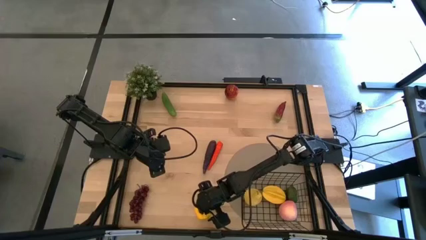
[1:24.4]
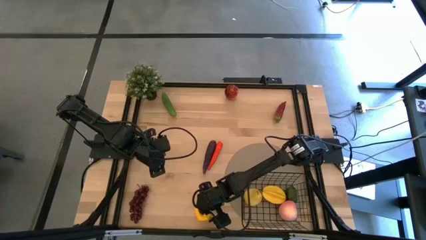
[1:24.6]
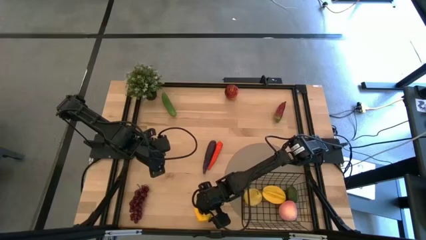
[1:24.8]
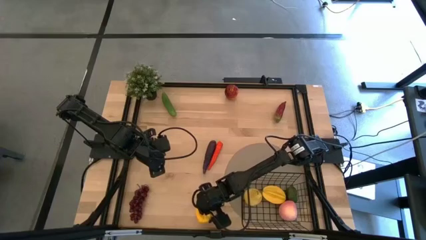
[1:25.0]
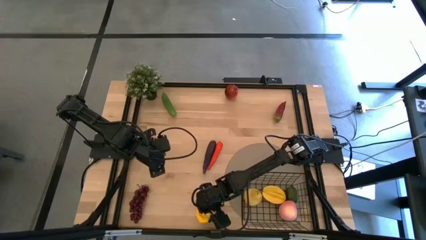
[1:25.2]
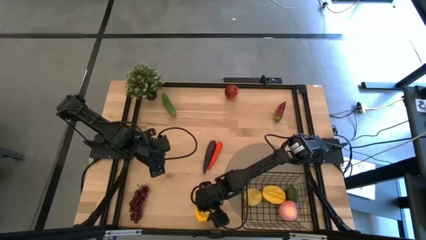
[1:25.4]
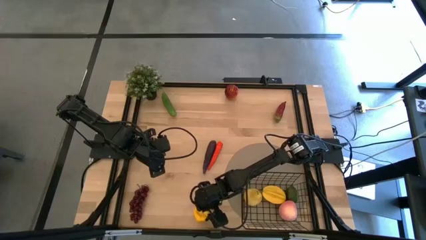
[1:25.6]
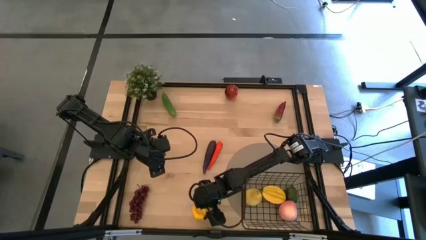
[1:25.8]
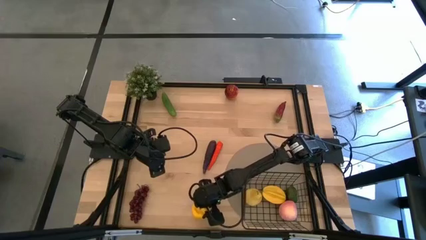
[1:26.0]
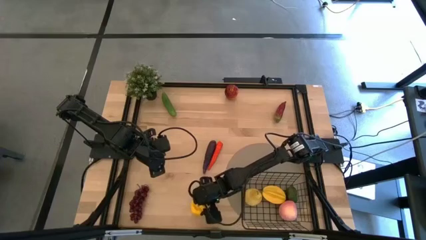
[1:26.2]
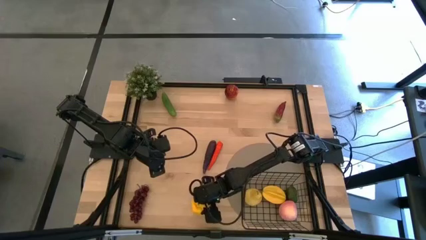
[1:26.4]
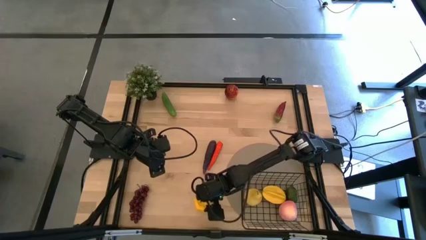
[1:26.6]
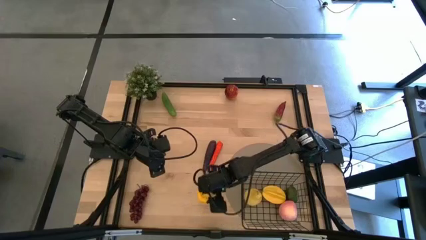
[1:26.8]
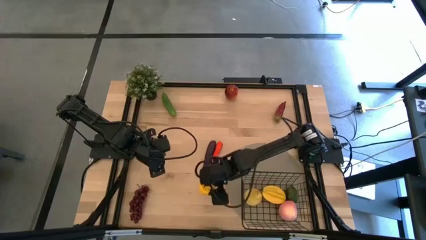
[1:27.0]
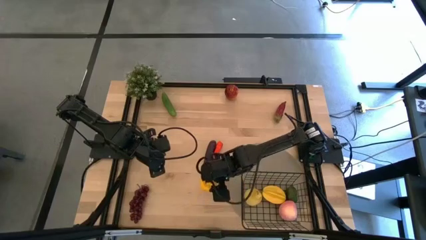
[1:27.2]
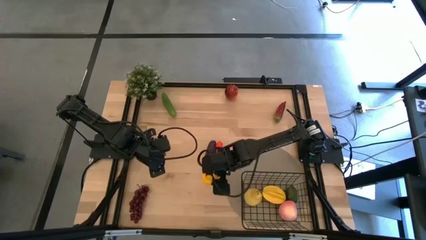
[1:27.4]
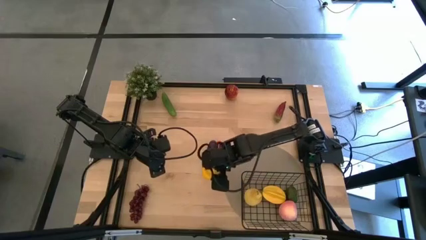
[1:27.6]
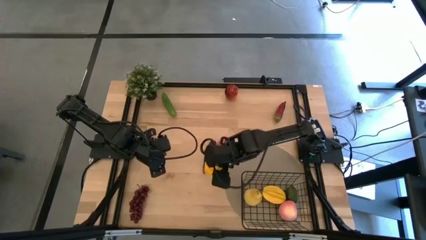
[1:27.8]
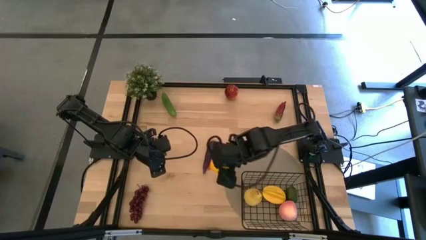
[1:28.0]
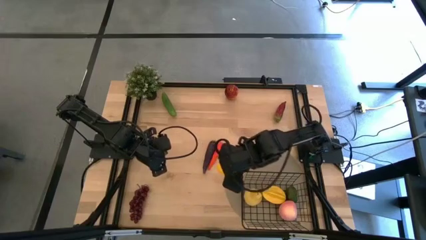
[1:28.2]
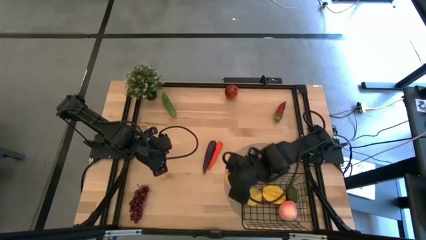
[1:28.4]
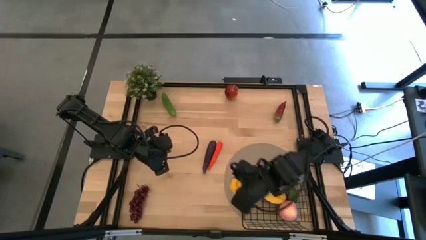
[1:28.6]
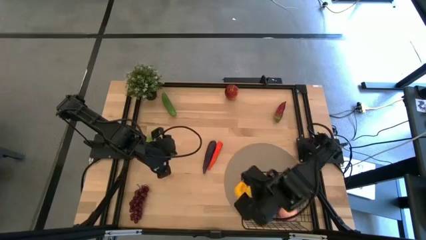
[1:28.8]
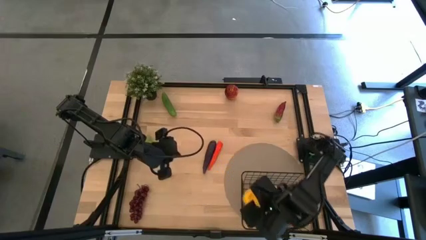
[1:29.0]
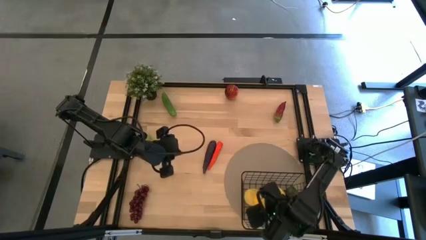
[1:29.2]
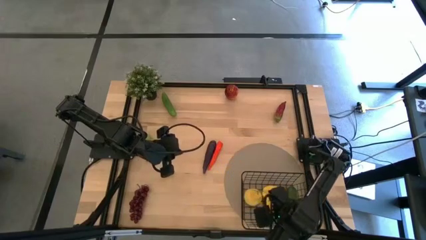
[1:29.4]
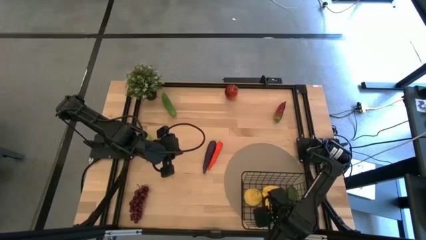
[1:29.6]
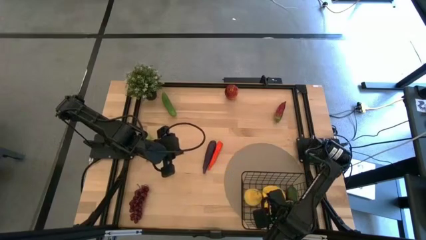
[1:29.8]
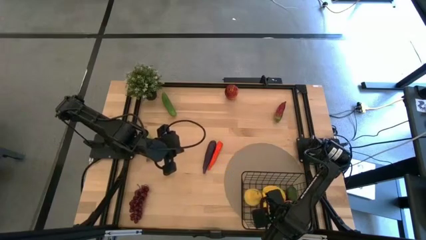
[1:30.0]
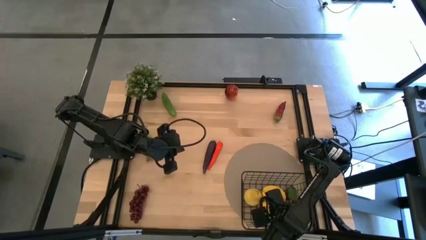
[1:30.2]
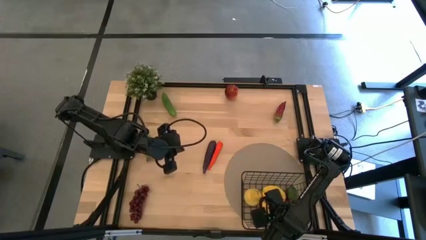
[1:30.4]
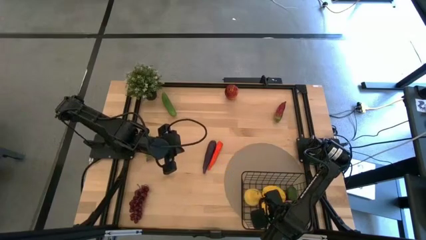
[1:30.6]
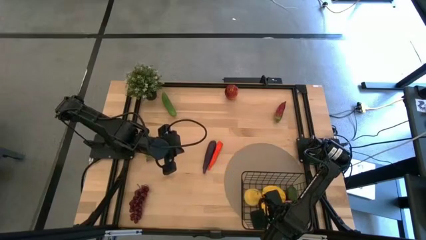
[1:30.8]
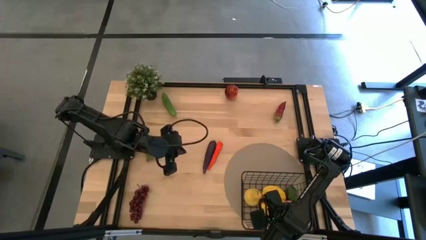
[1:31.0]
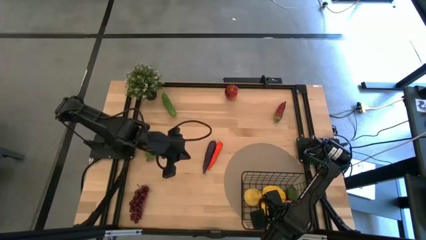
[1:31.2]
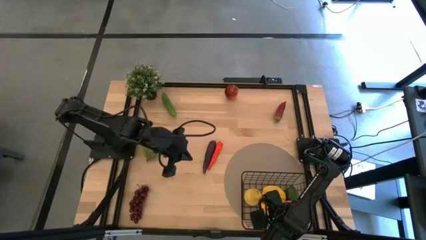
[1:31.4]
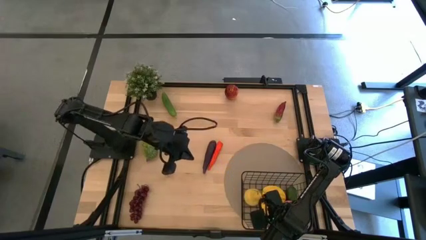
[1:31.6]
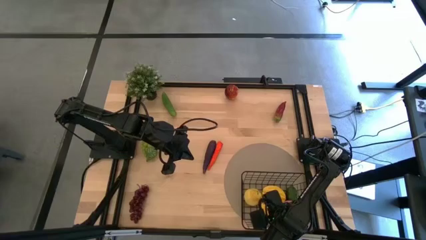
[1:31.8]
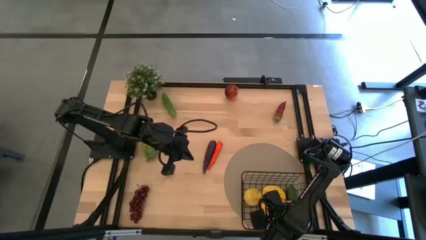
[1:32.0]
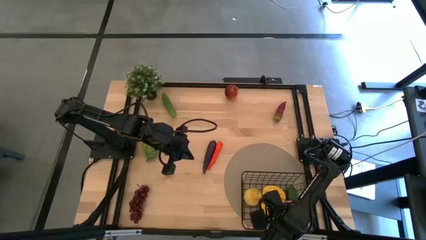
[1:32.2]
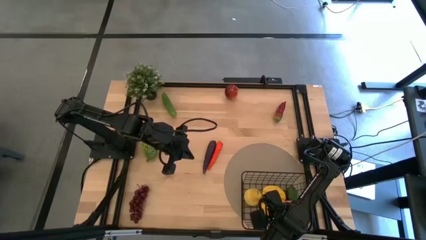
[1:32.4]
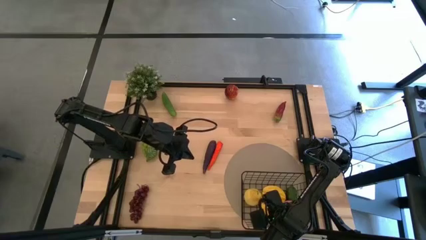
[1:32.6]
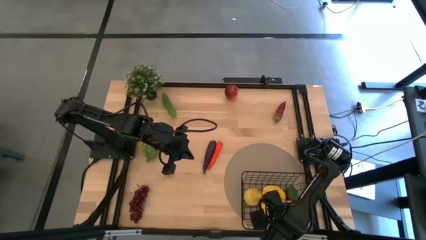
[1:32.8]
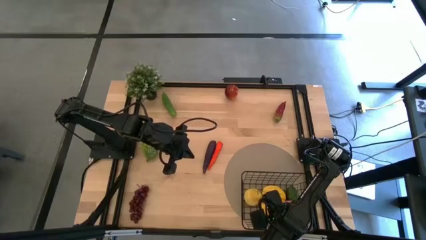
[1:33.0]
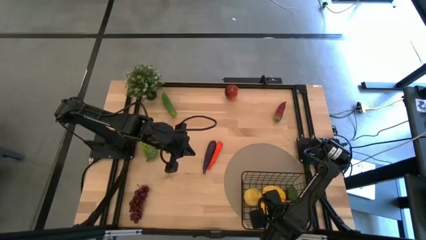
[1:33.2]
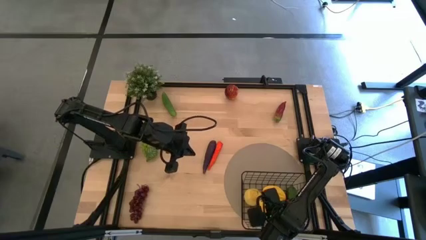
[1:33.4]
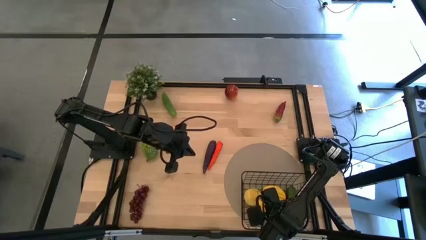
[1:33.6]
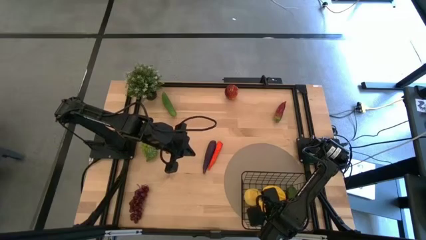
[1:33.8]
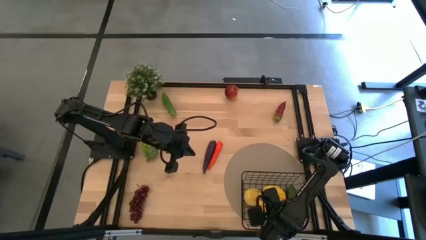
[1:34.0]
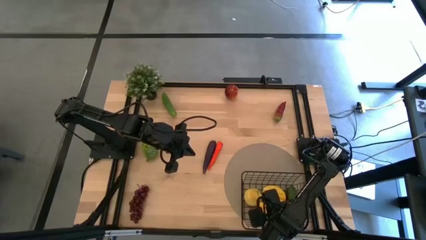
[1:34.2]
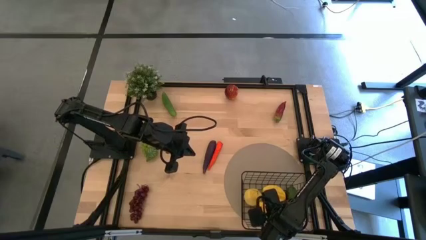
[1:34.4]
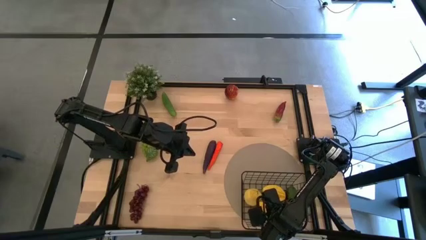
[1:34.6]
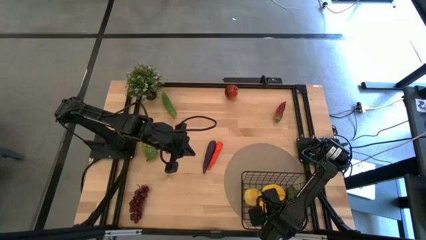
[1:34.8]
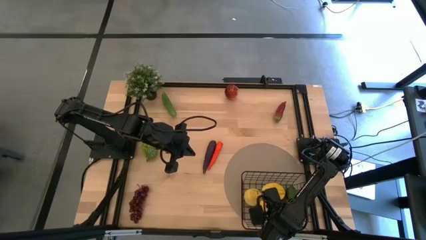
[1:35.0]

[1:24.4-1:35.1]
Task: Build produce basket
Put the yellow bell pepper into the wire basket

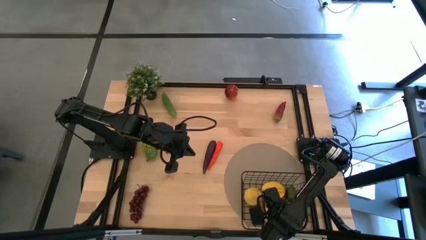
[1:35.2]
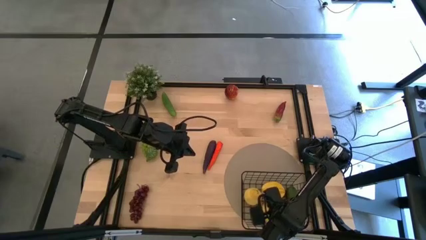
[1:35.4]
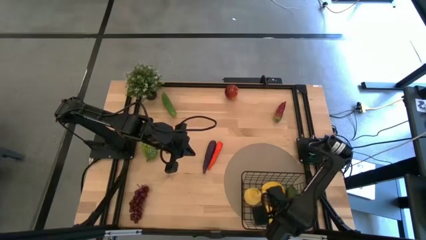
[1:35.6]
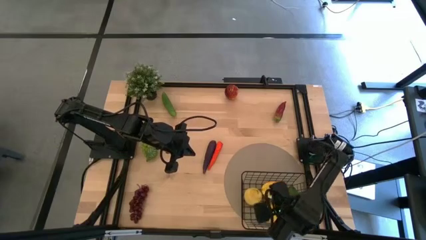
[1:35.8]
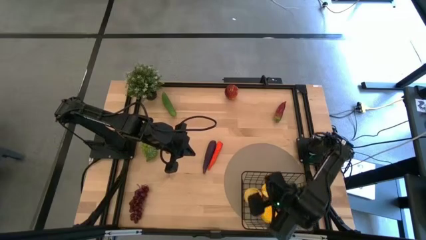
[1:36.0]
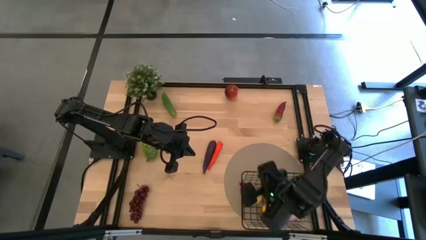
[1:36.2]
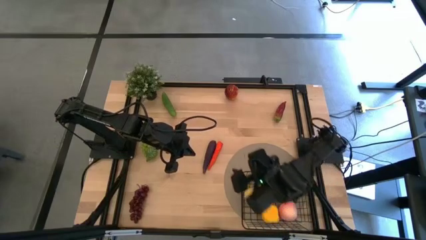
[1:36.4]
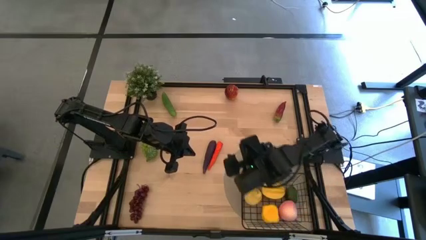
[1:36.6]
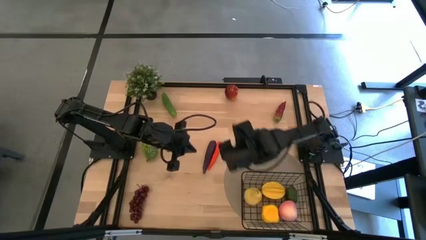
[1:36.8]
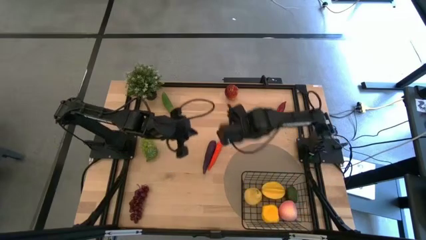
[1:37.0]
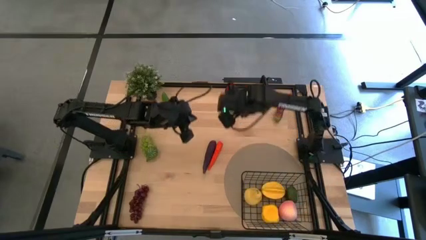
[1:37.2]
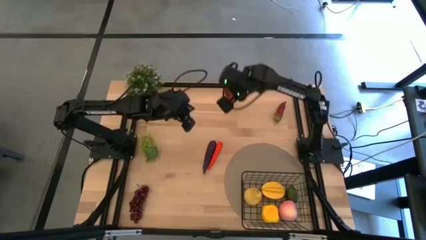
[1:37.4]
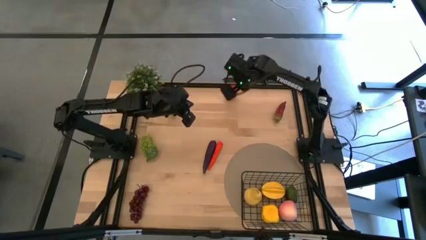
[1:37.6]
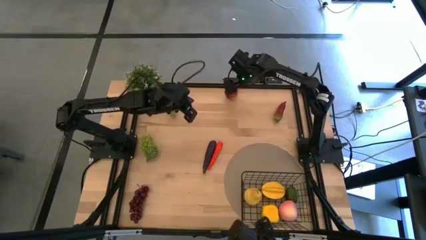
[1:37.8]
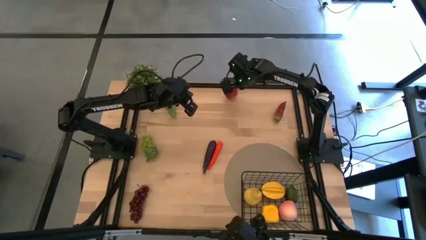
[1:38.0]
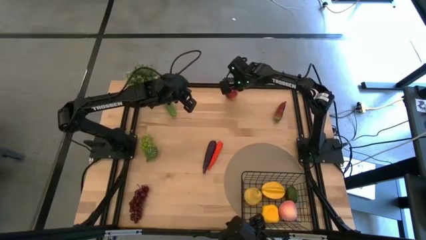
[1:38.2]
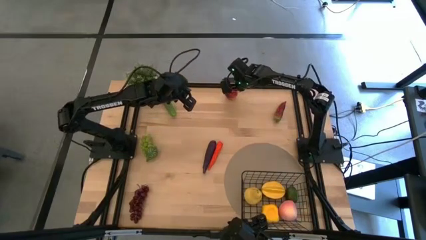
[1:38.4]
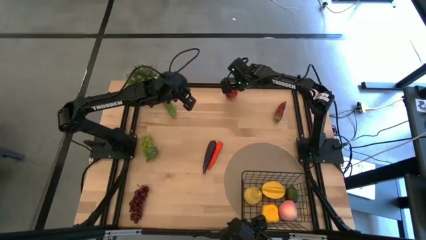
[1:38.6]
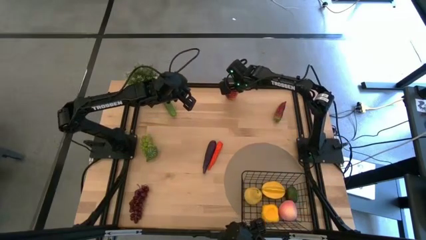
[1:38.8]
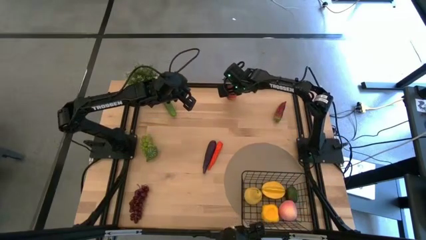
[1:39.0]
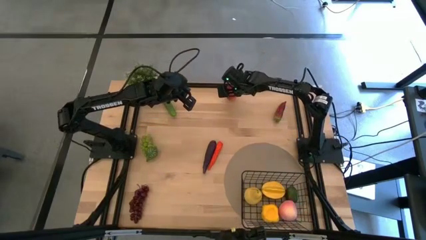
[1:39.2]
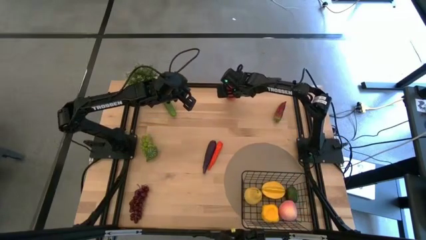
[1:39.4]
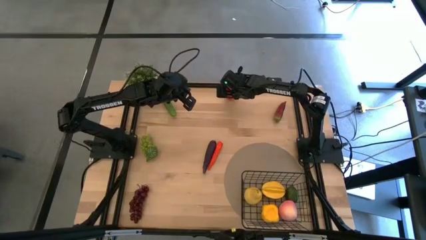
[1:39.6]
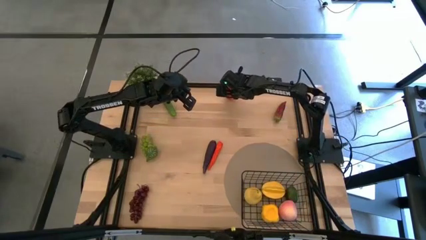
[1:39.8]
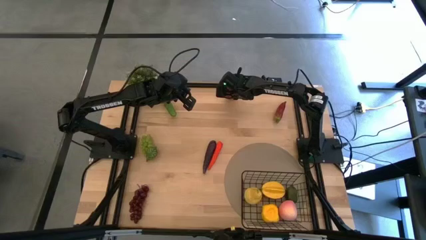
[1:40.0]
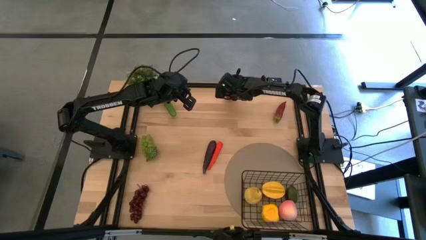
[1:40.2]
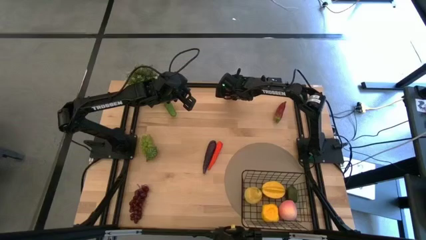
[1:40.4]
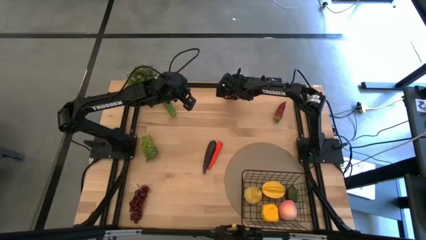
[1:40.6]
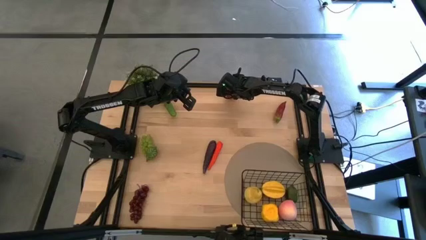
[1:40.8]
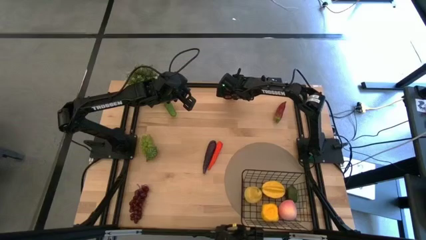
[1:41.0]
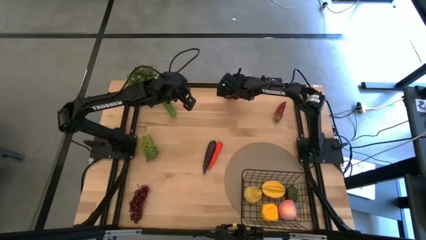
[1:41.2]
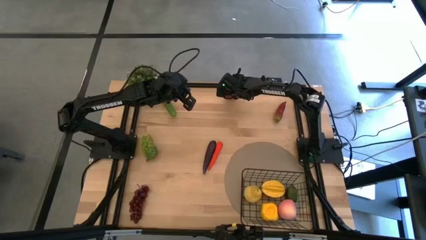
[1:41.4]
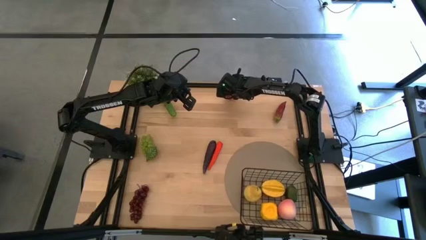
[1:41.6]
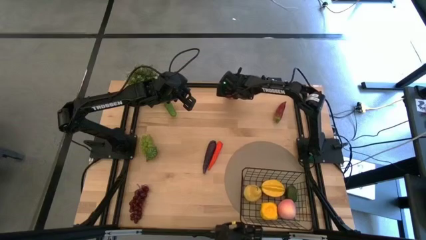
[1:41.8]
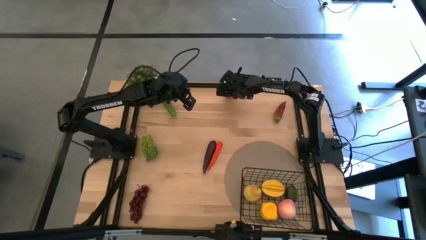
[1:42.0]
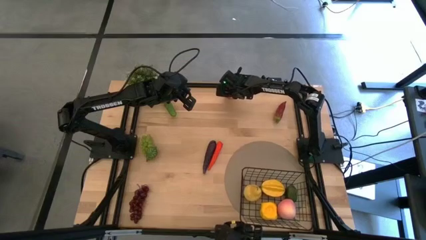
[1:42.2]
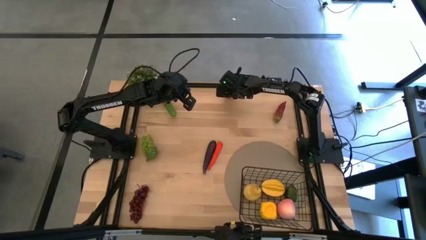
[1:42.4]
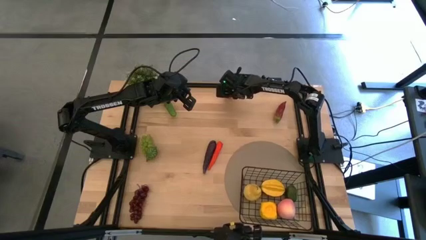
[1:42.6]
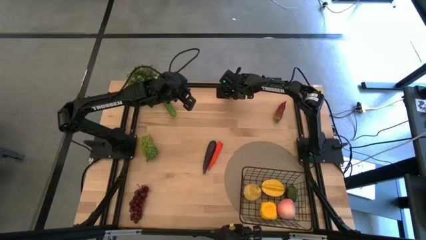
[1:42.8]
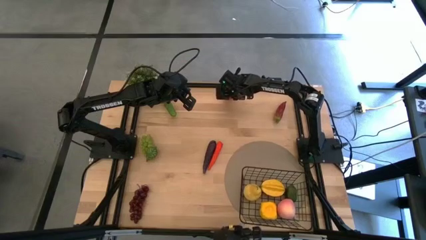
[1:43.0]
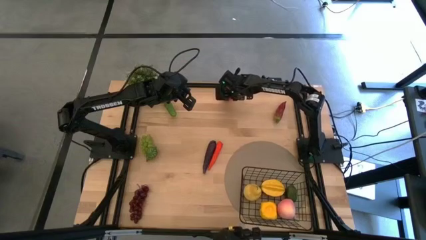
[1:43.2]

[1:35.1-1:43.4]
Put the red apple into the wire basket
